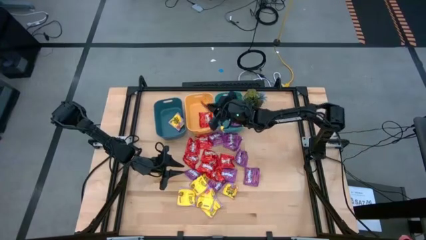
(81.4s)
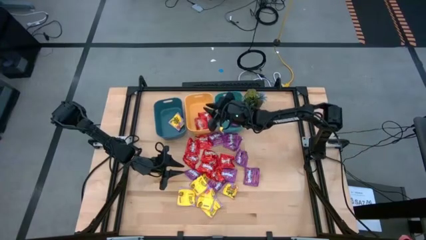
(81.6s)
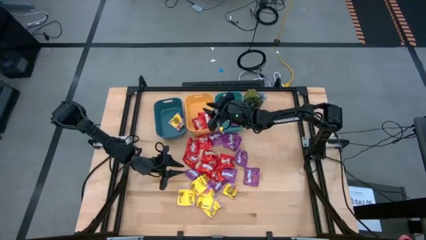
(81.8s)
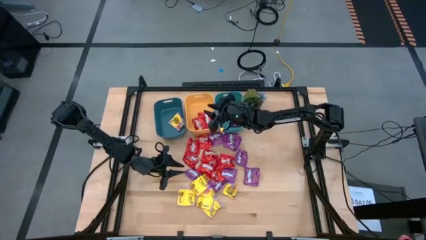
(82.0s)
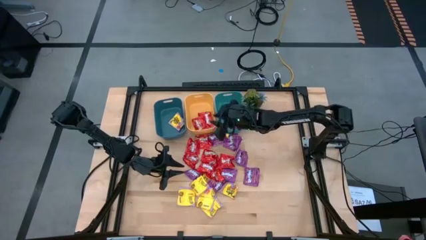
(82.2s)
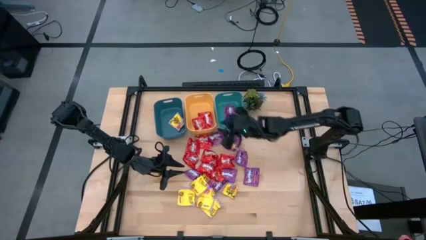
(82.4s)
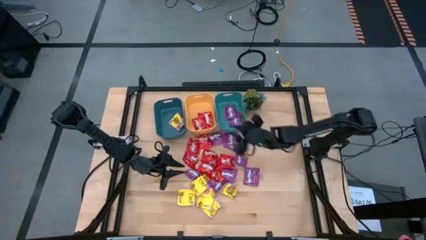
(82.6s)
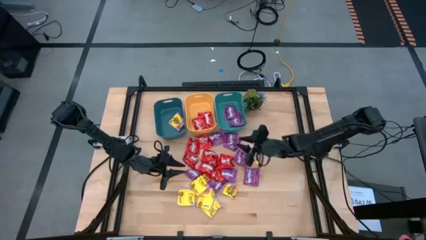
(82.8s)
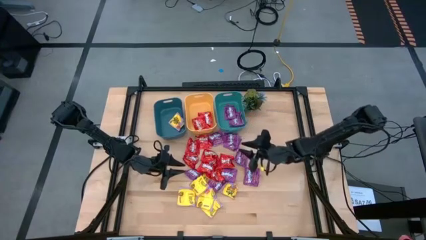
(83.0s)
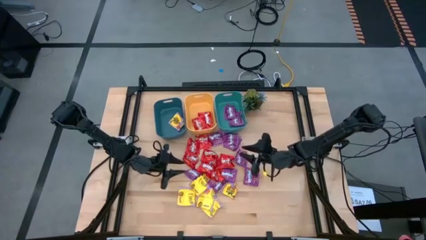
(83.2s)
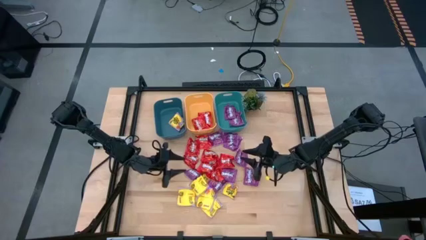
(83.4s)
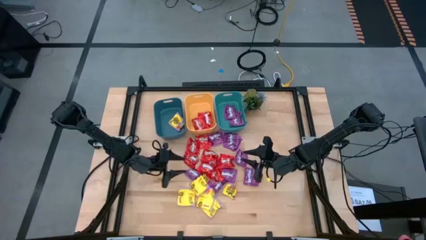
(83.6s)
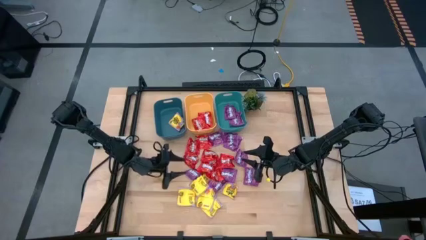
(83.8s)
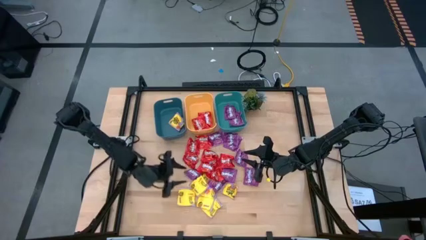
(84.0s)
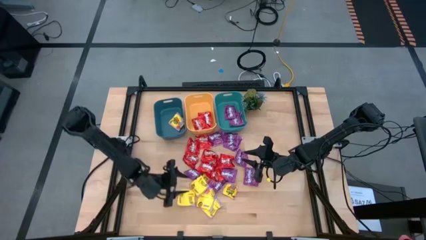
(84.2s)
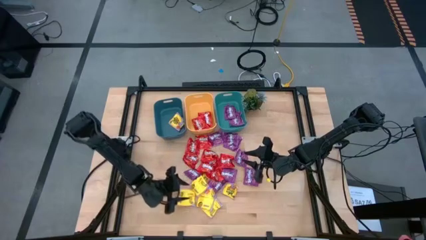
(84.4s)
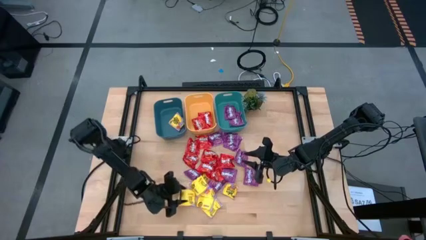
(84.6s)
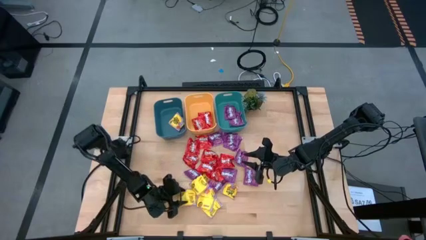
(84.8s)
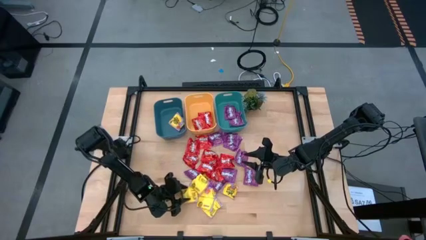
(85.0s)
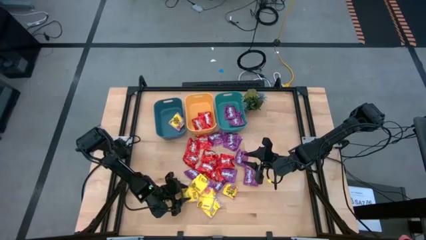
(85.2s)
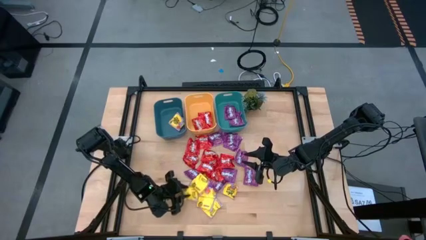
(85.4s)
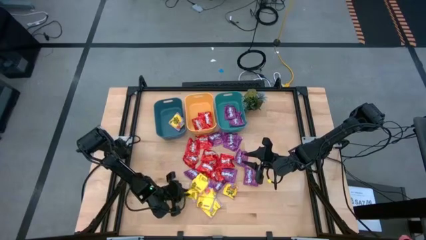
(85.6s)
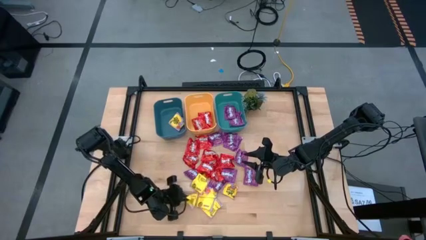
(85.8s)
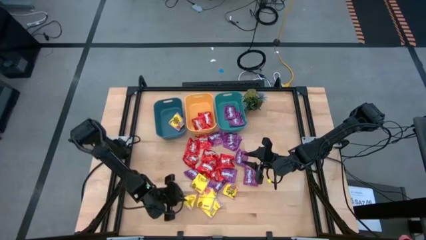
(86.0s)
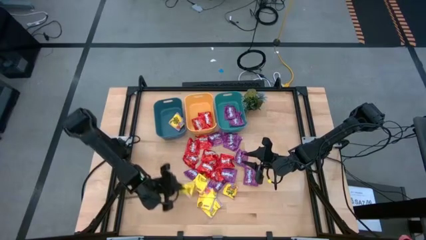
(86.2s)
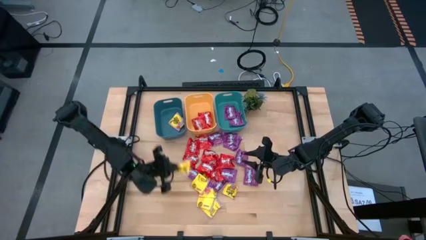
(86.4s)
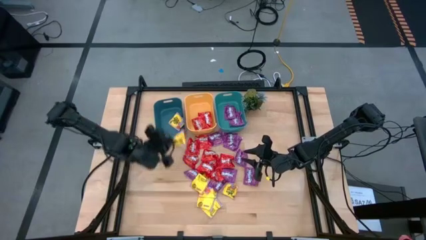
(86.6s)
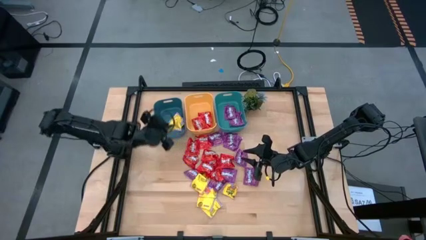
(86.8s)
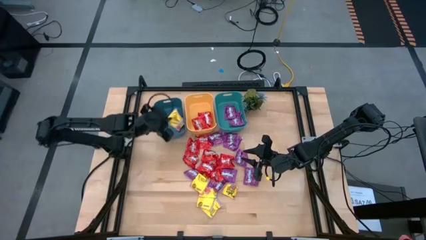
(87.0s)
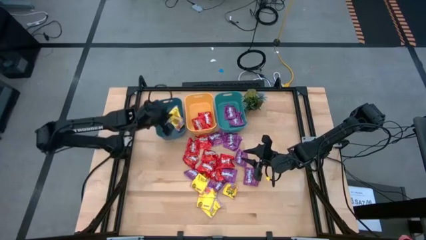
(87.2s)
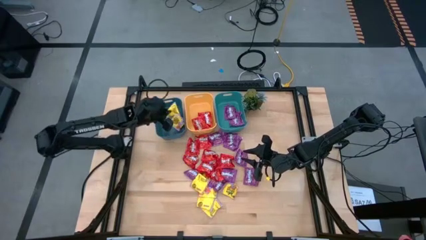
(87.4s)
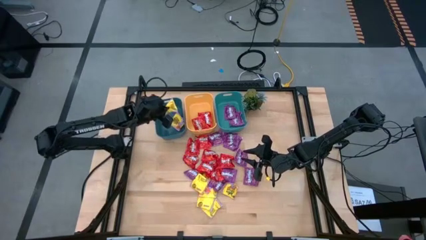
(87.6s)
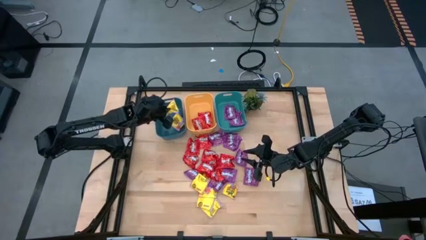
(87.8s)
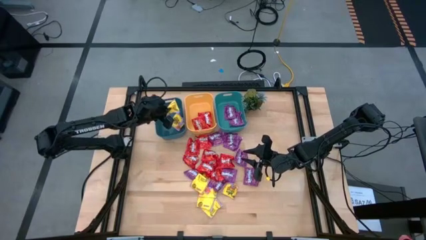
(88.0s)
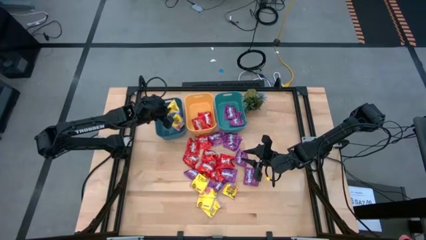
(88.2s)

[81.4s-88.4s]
Task: Sort candy
Put the yellow candy into the blue bin

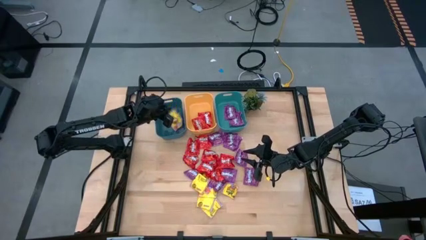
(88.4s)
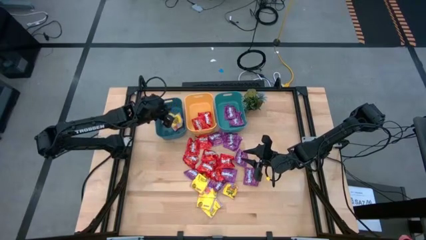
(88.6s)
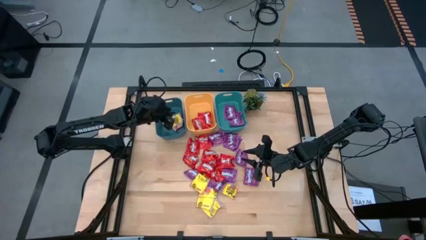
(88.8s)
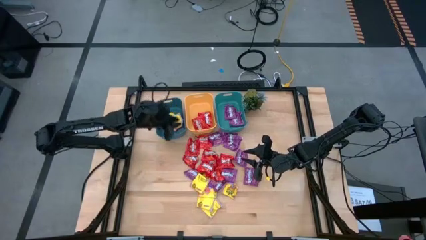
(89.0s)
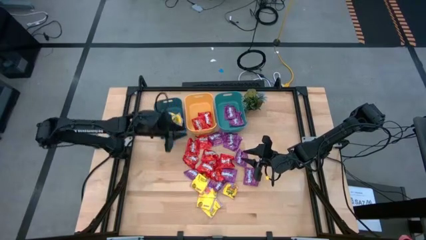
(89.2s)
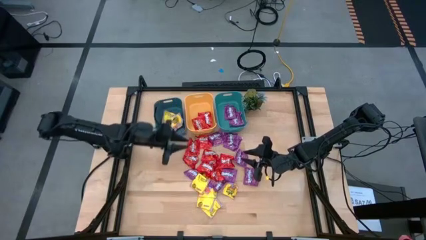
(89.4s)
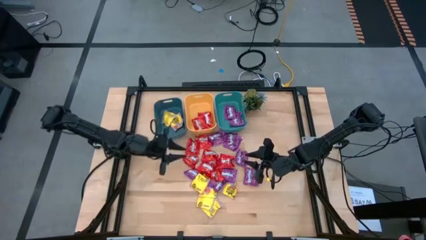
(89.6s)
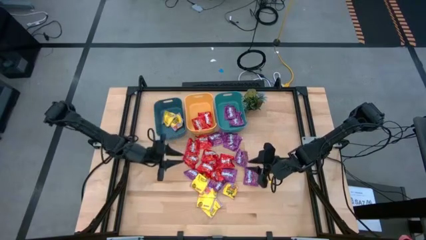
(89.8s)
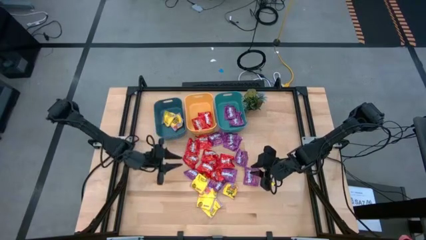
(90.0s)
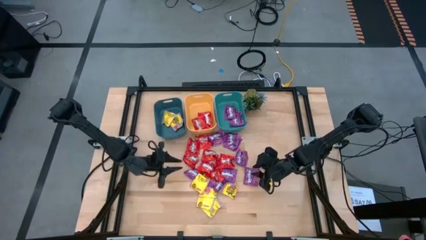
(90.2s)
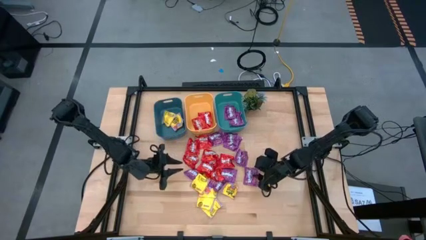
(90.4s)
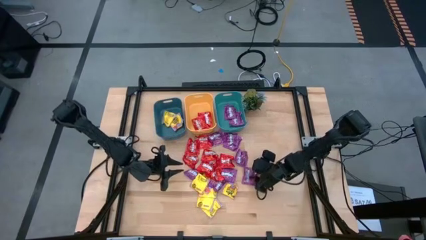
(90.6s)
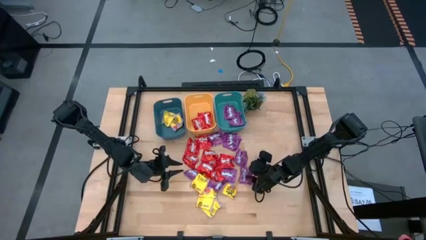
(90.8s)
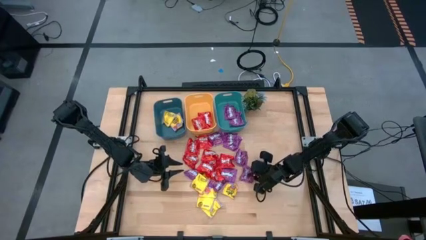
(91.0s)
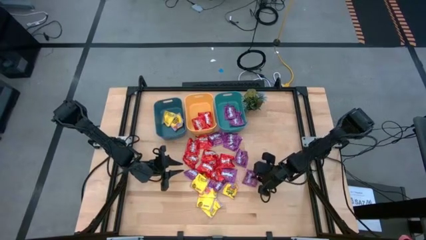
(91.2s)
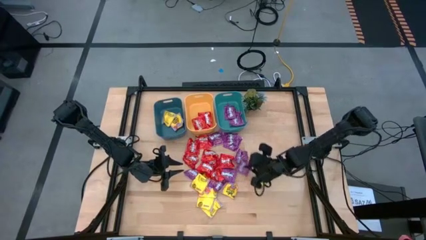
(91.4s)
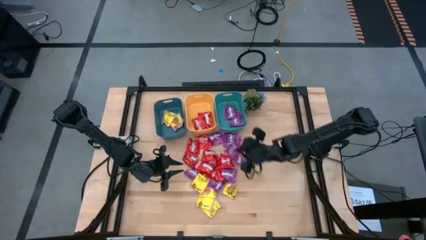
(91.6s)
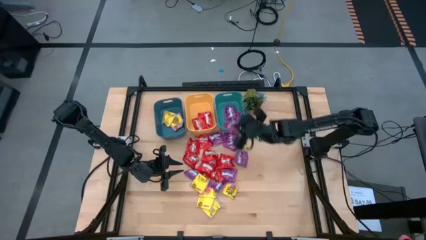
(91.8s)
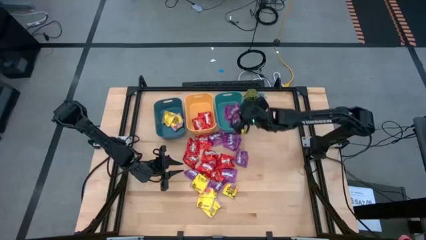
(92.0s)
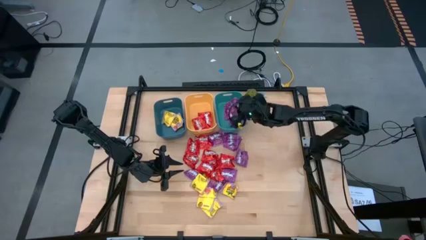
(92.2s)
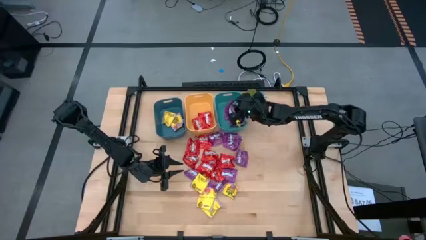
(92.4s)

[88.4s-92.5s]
Put the purple candy into the green bin

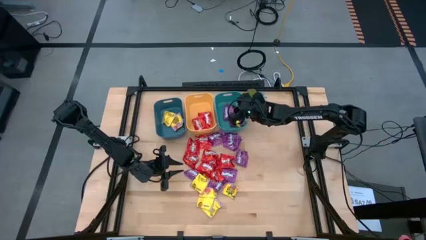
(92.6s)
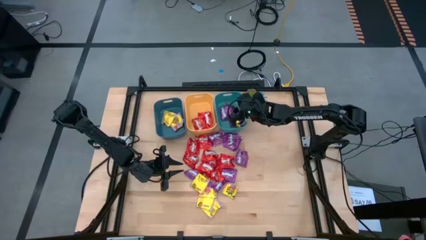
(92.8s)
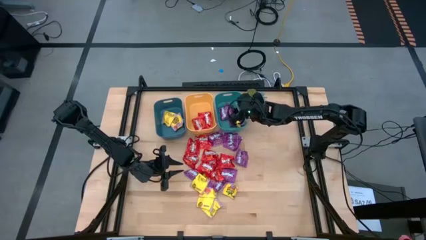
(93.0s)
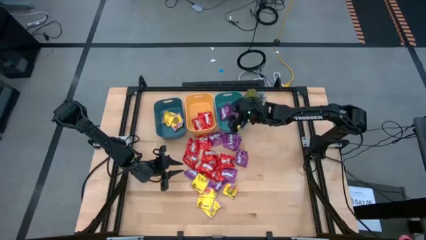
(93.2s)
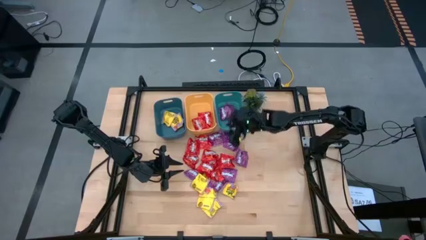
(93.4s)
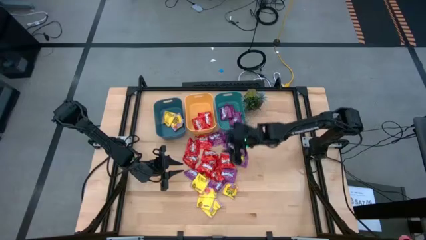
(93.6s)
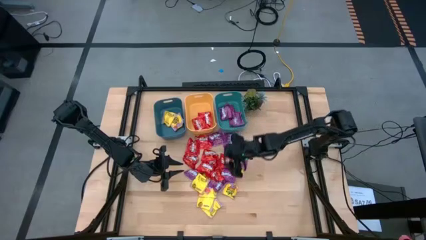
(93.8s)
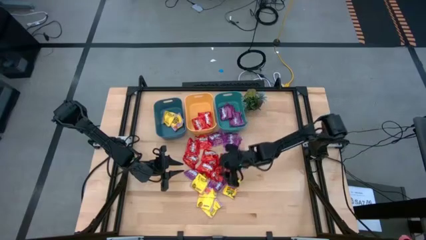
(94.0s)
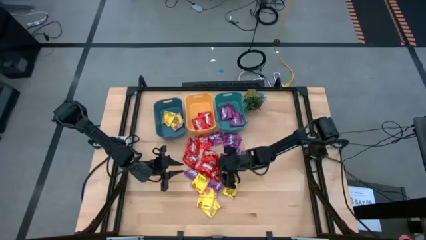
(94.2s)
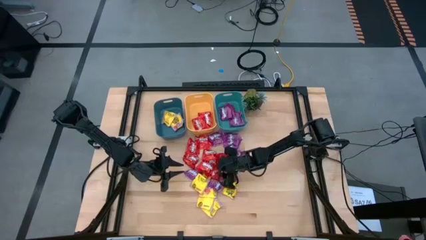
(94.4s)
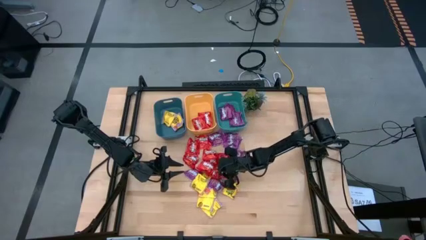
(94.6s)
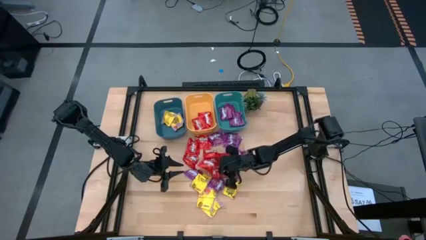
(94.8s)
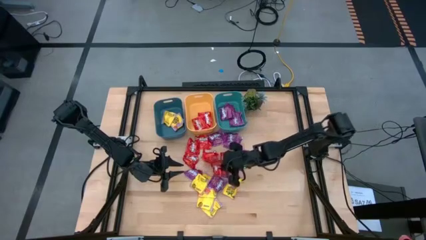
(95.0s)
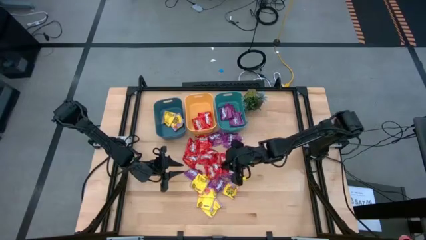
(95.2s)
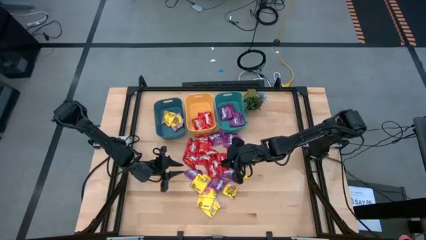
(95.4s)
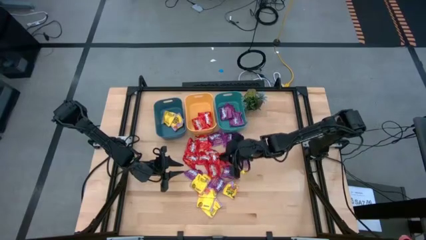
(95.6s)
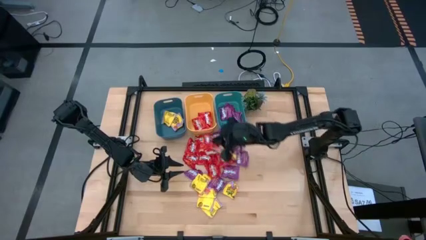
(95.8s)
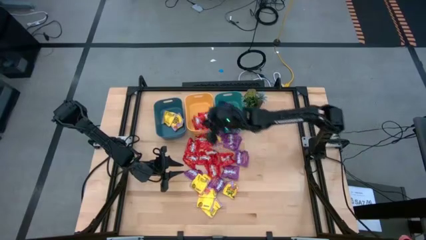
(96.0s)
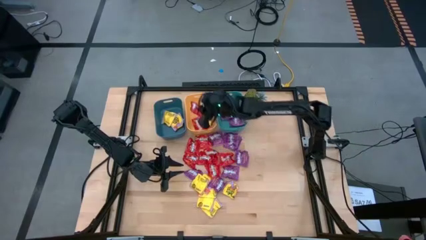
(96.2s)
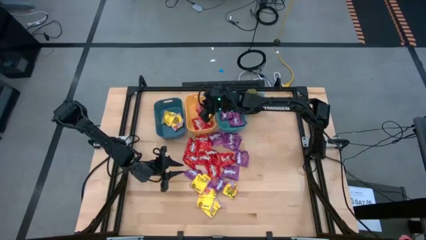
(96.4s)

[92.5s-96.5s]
Put the red candy into the yellow bin

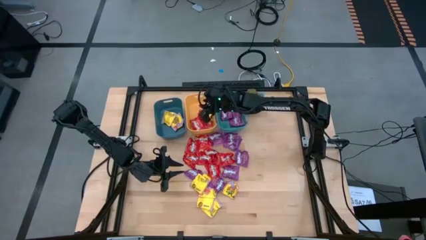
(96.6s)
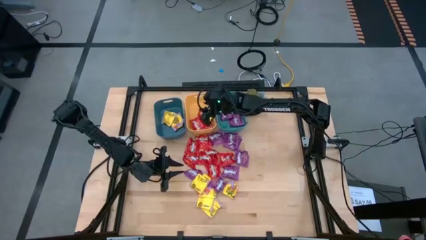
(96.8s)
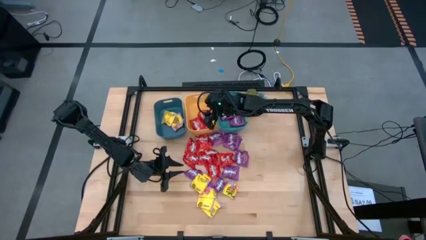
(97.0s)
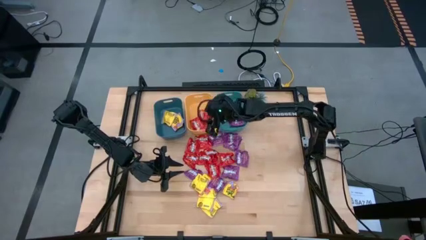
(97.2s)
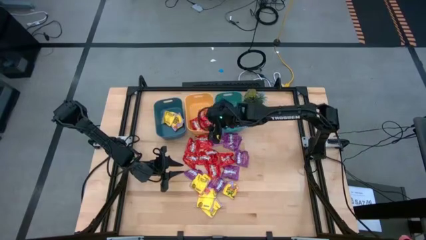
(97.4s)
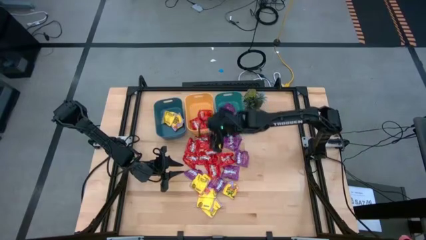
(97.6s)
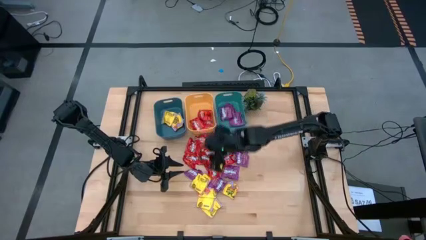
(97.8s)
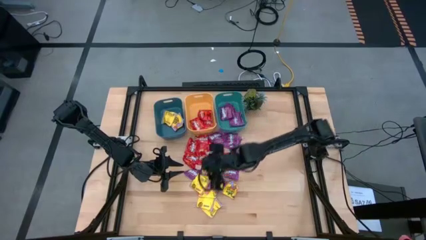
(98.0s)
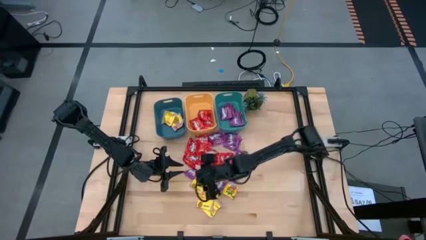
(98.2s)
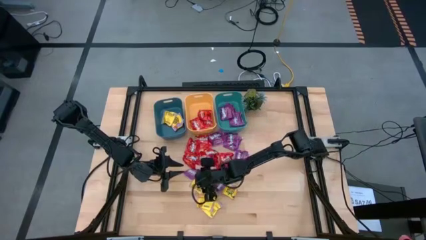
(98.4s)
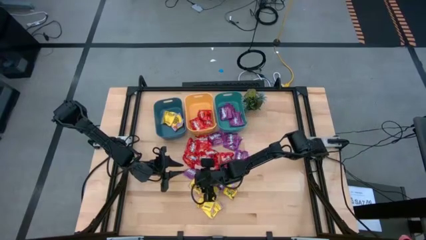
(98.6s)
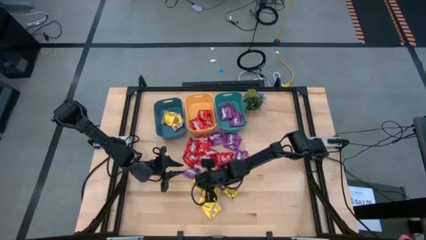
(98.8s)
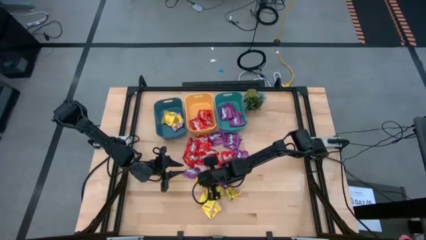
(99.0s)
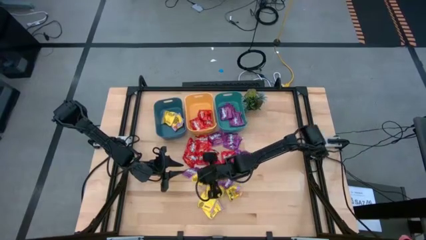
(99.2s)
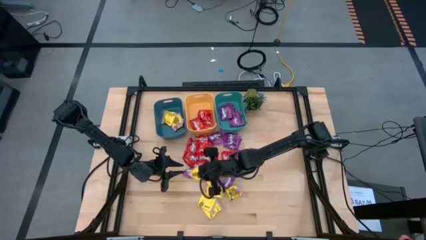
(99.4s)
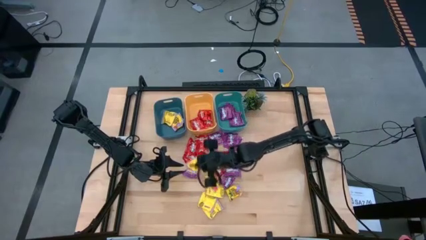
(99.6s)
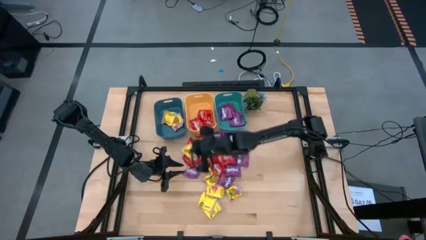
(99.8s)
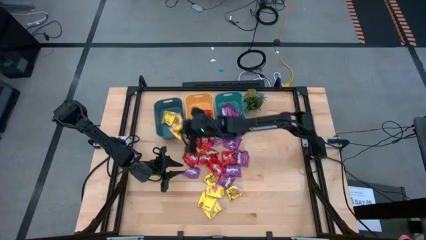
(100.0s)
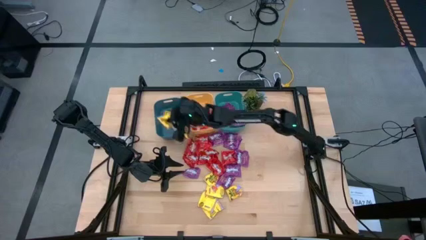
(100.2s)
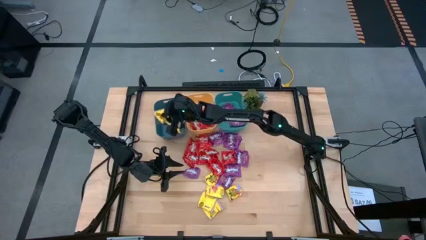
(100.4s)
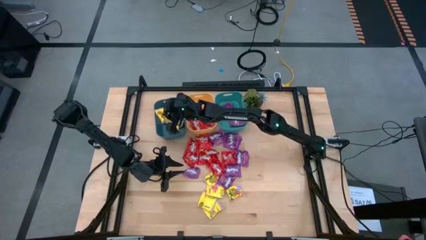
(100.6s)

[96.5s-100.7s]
Put the yellow candy into the blue bin
